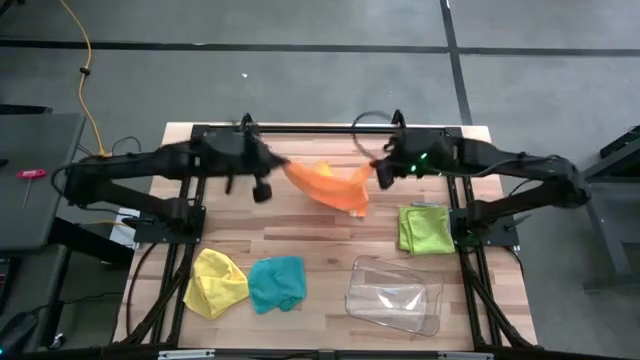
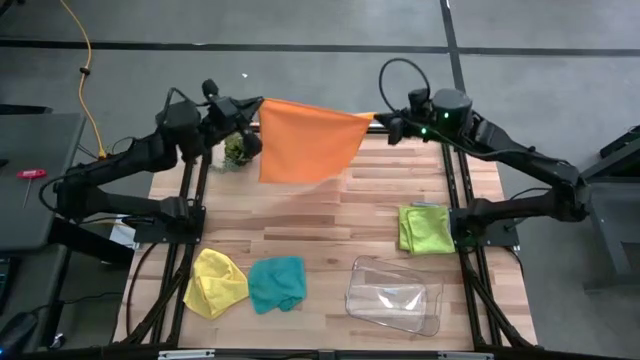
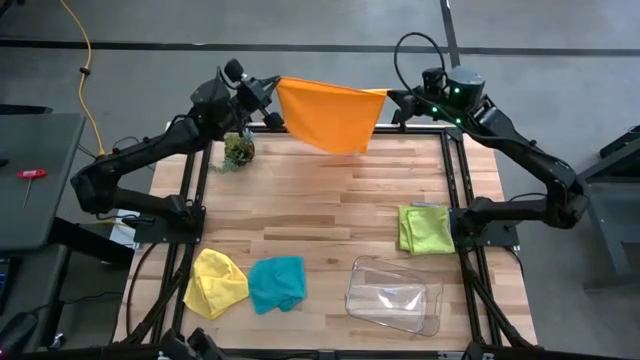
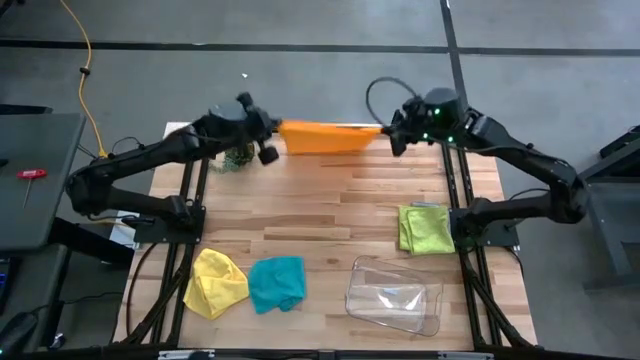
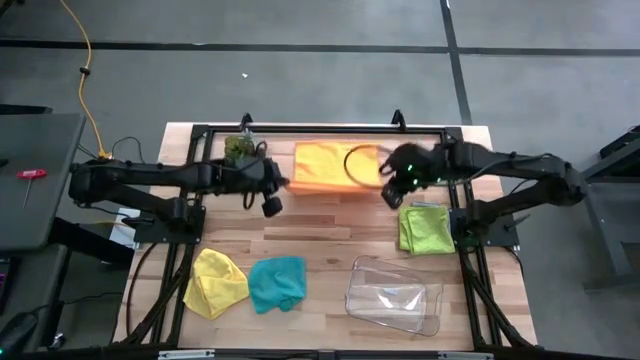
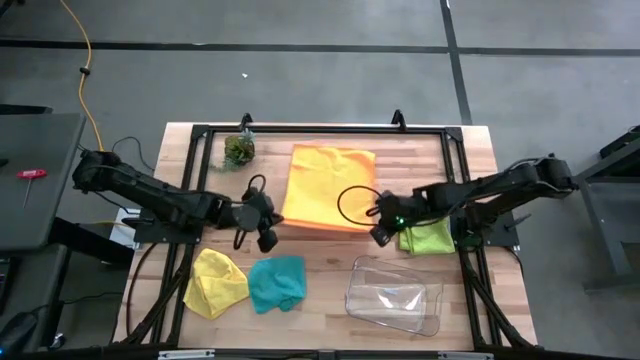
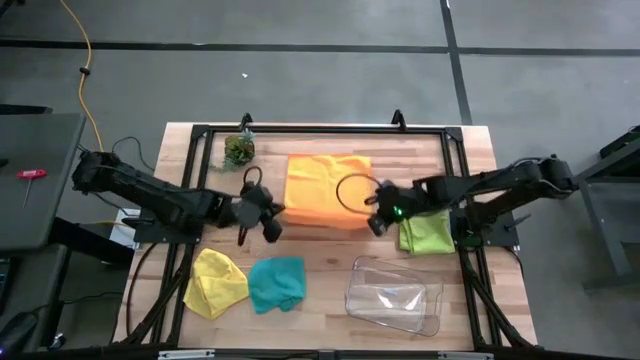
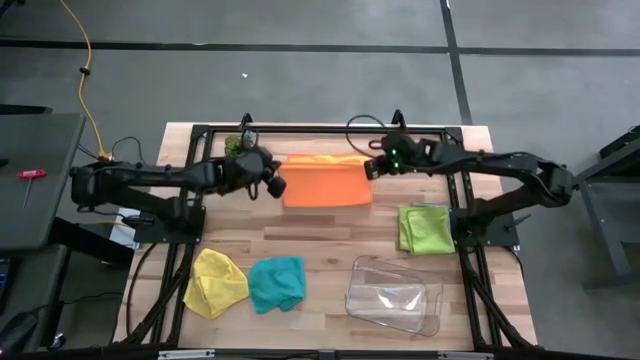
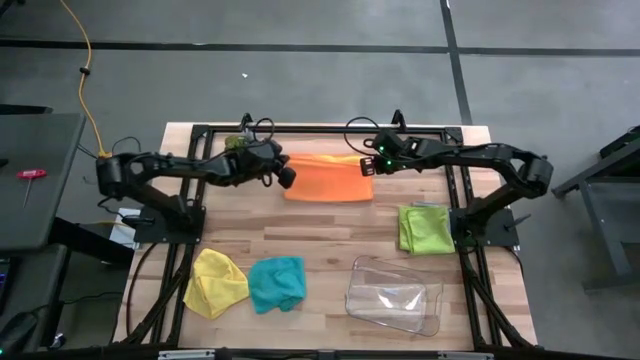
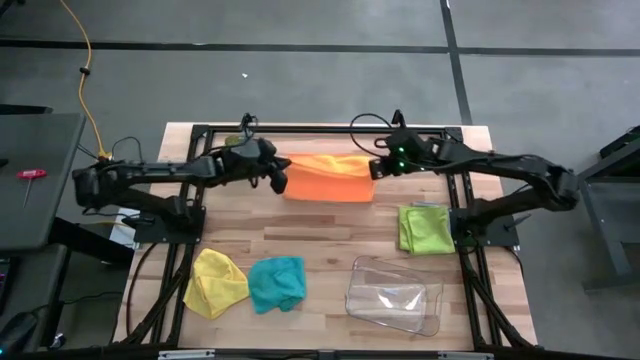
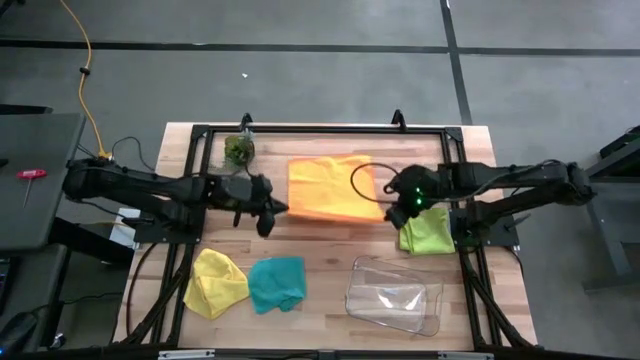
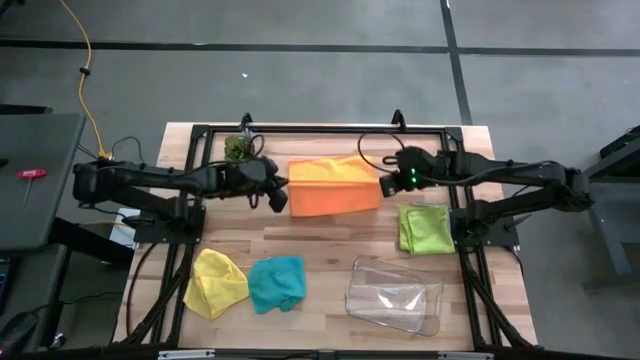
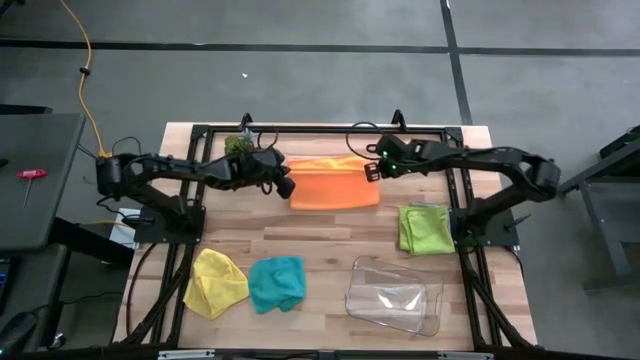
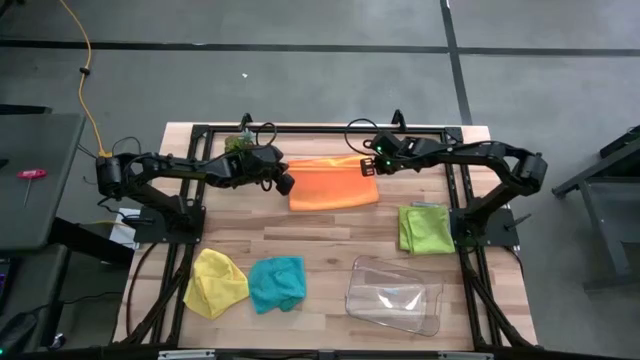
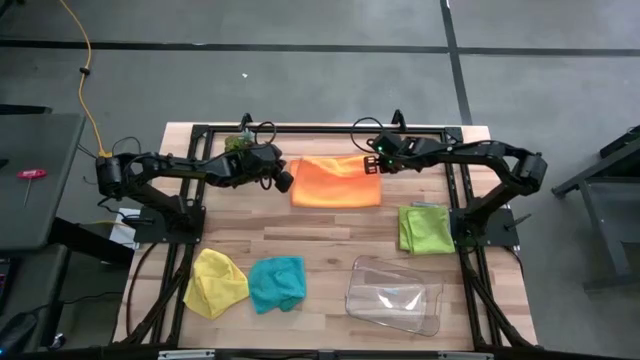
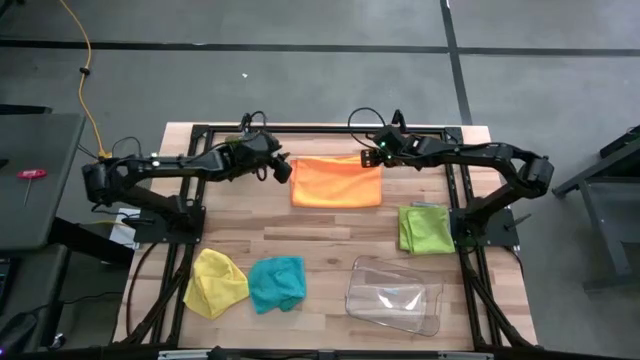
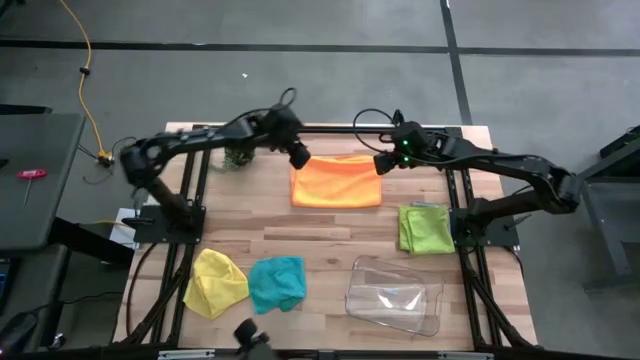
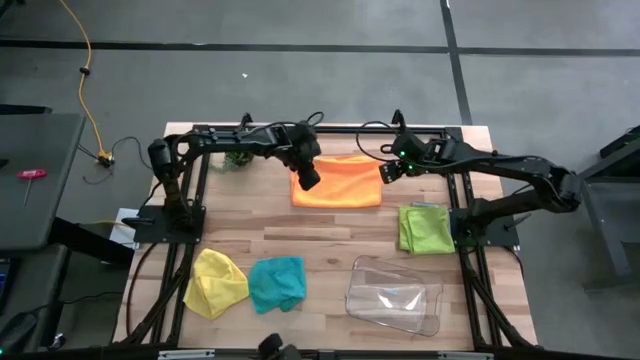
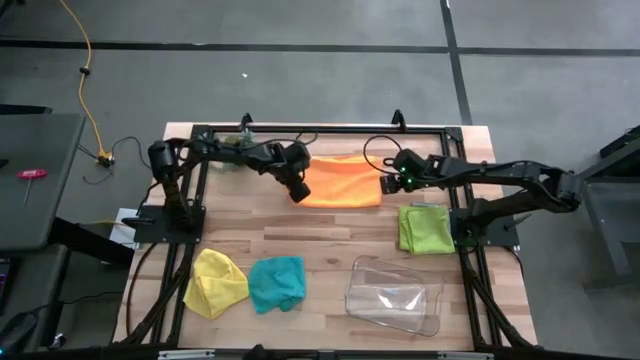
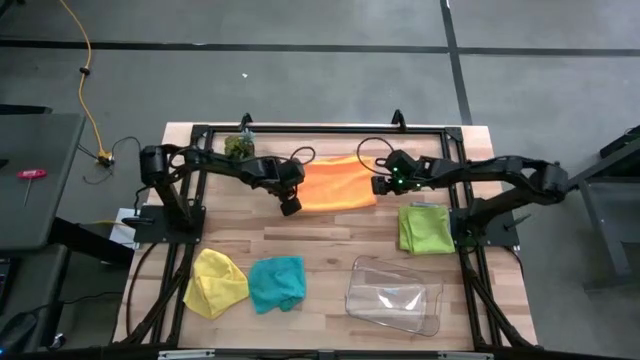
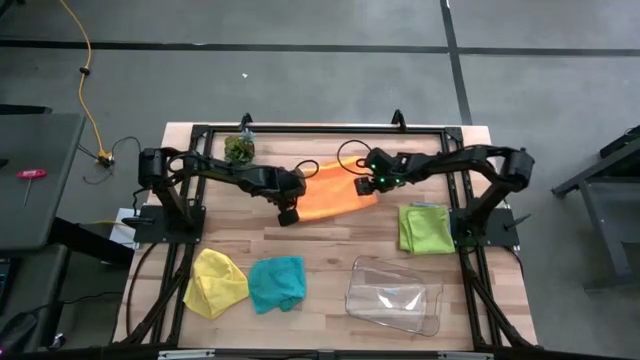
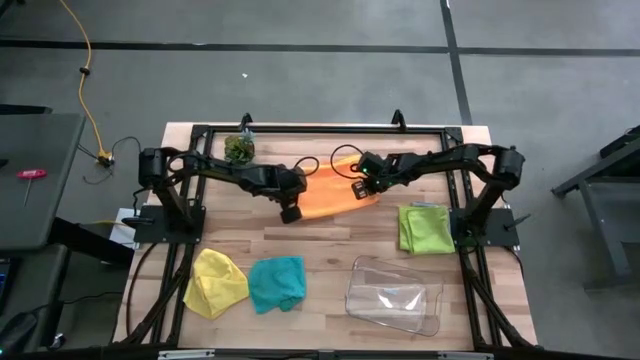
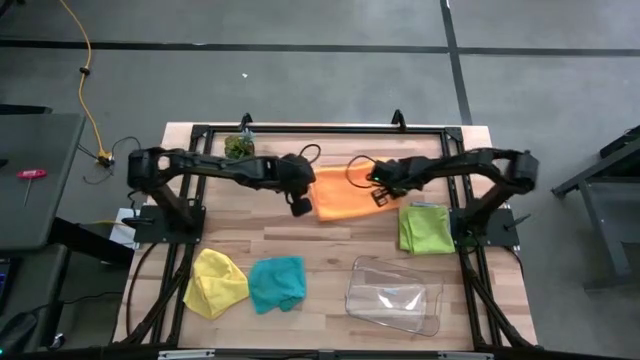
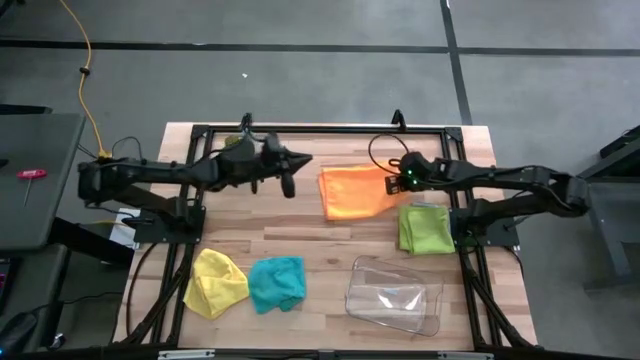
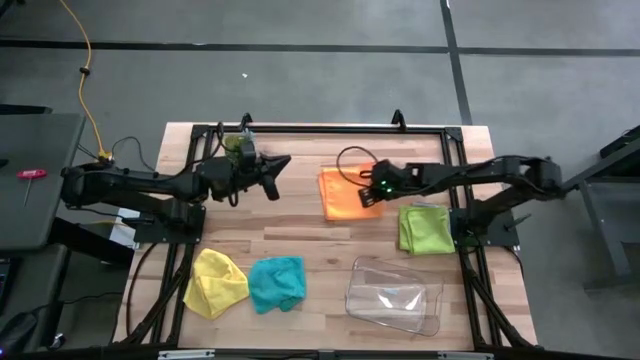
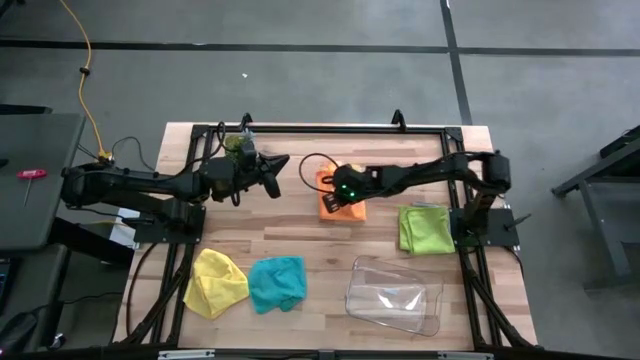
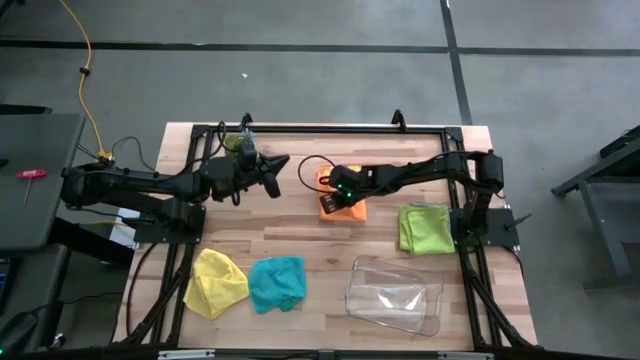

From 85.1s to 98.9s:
Task: Fold microfiber towels
Fold the orange cloth

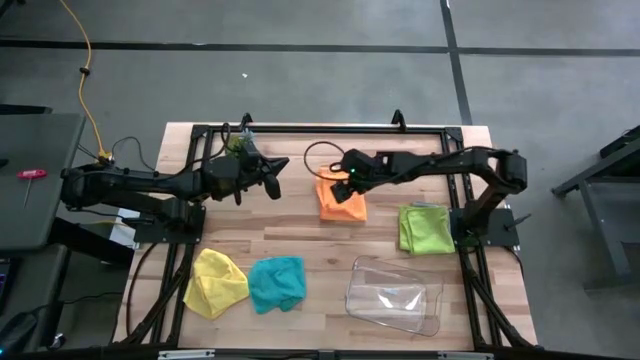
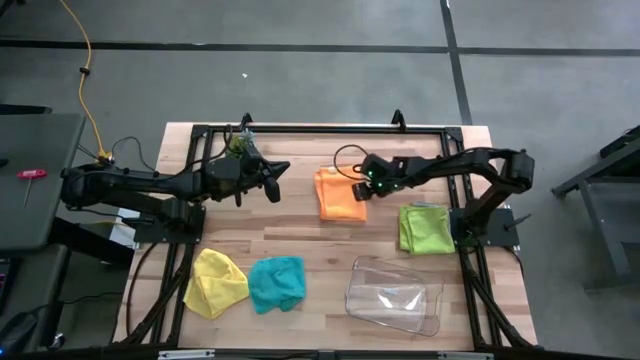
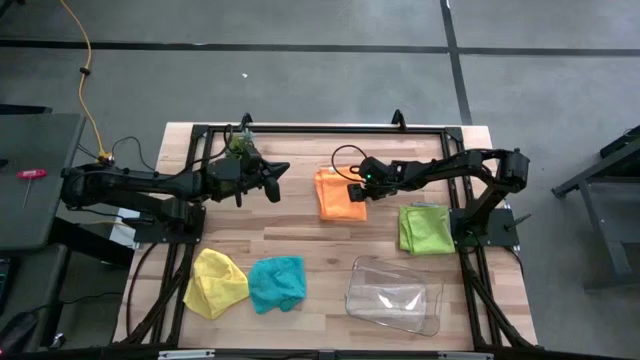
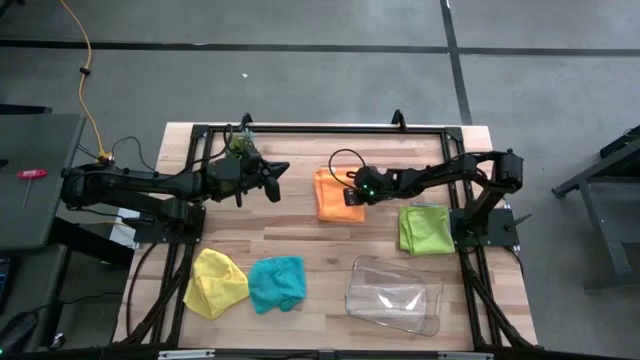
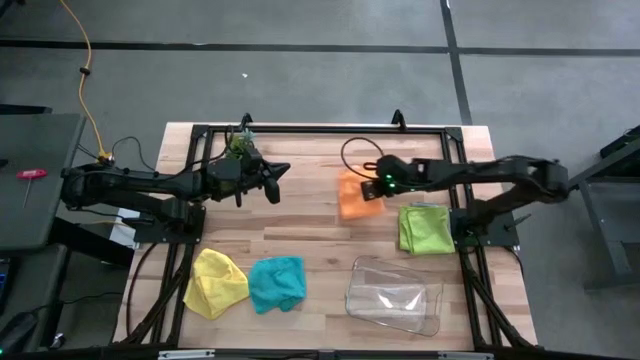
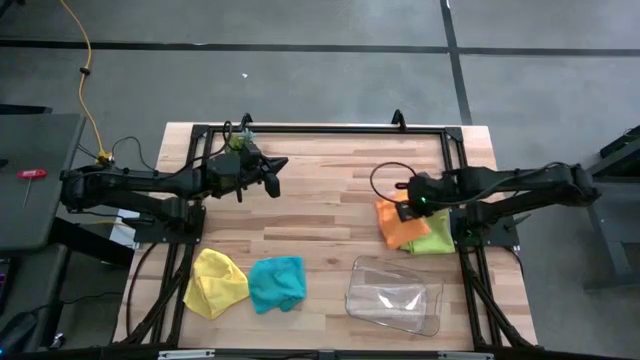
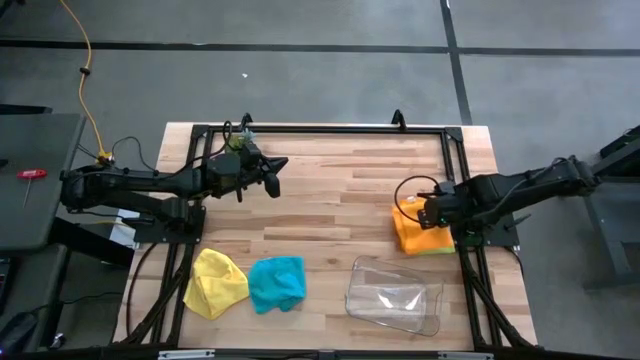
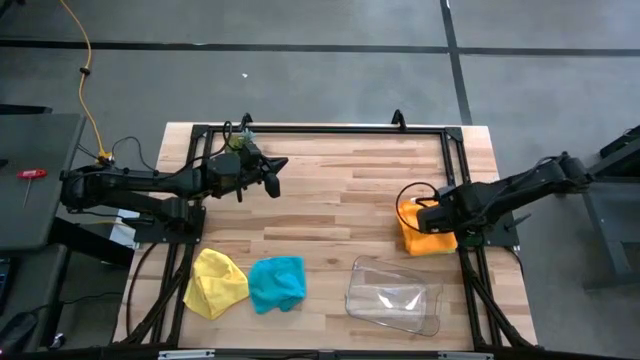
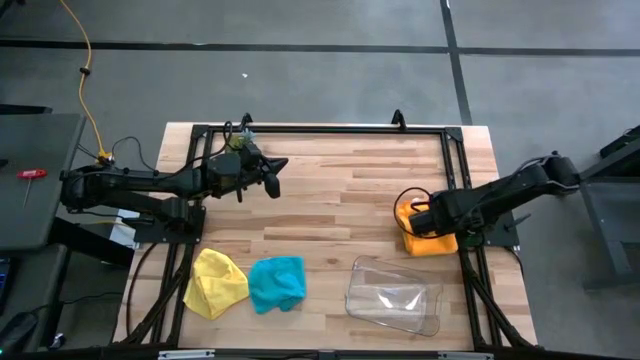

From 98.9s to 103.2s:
Stack the orange cloth on the green cloth

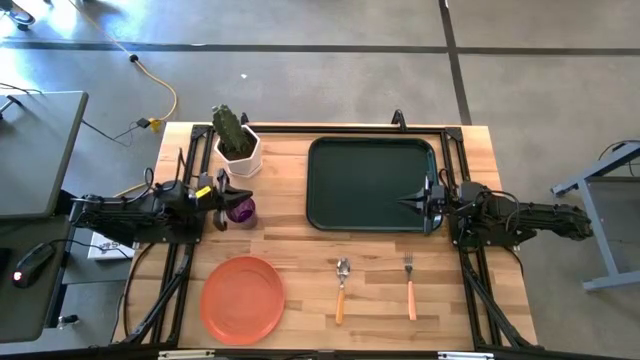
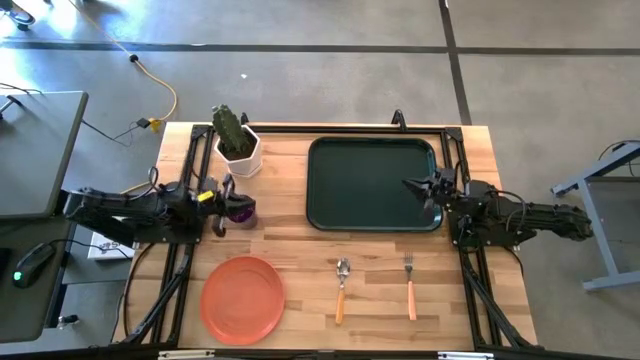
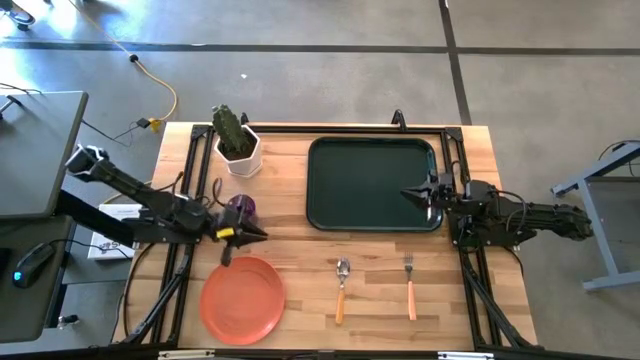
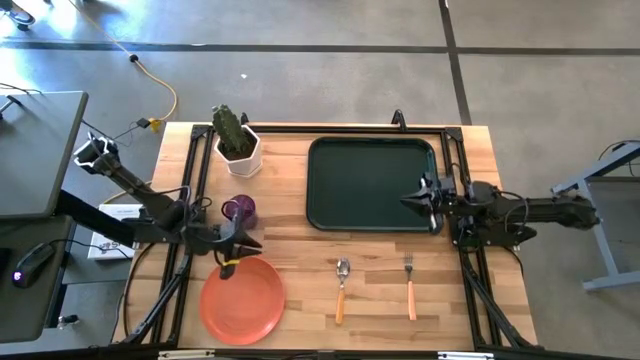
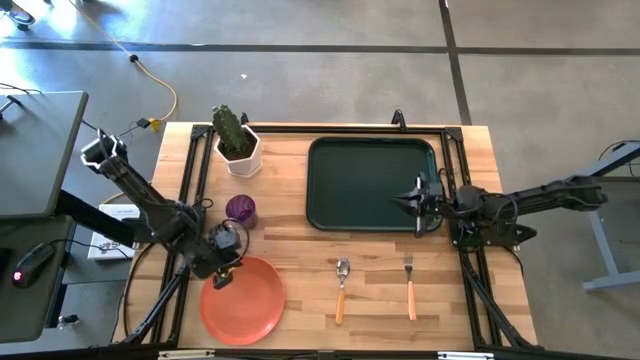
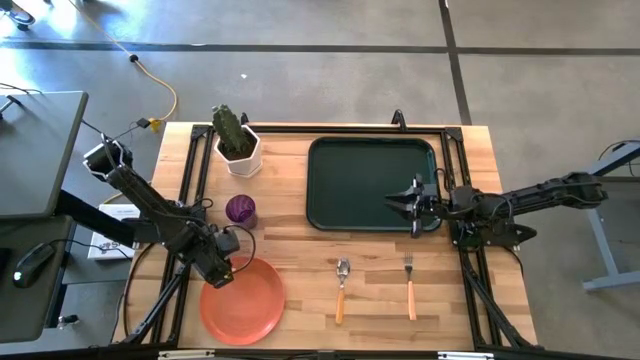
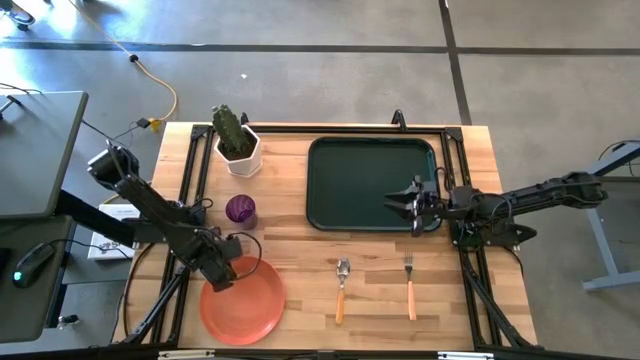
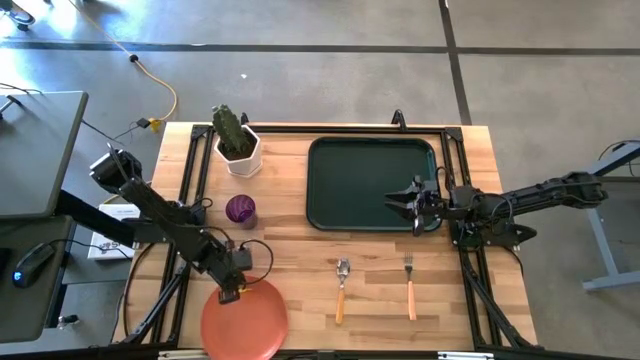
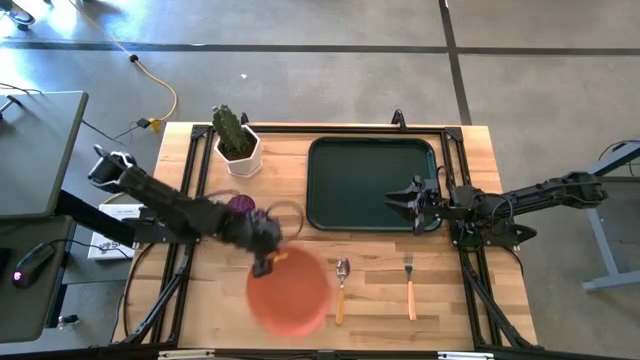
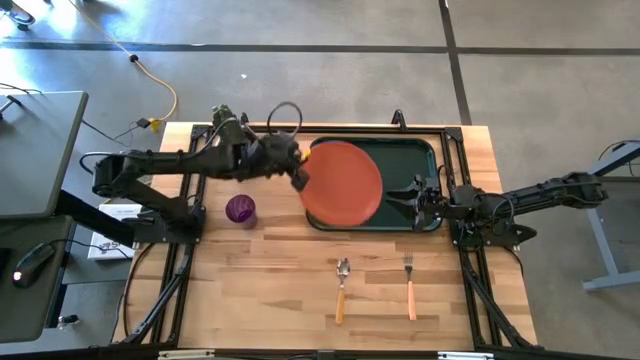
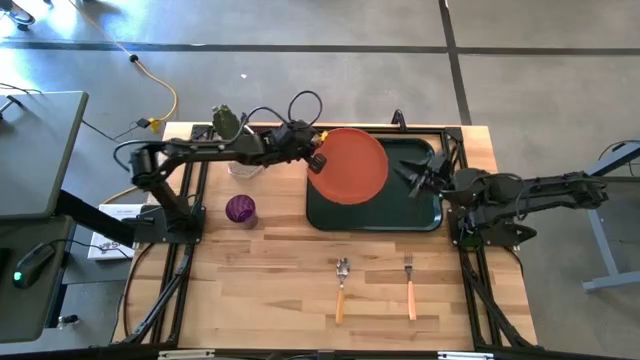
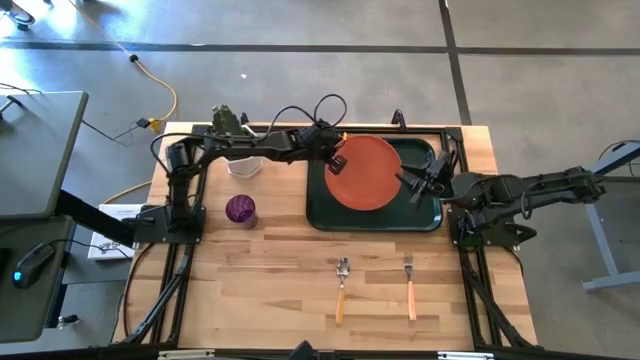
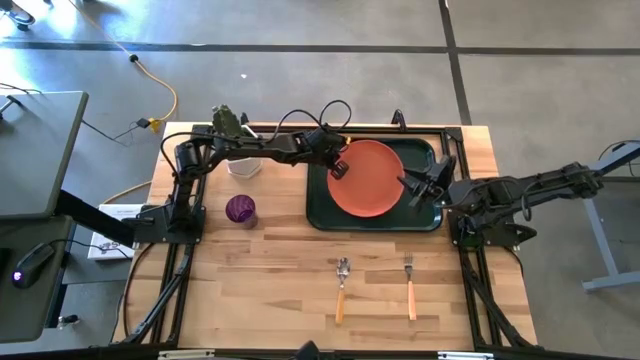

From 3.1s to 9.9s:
Task: Pick and place plate/cup/fork/spoon on tray
Put the orange plate on the black tray
